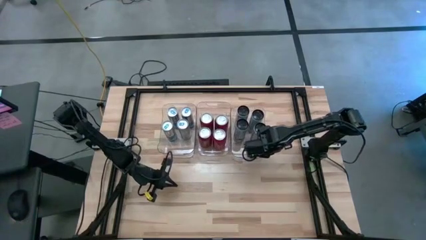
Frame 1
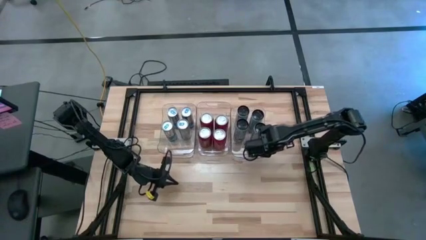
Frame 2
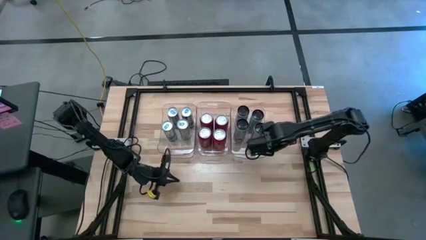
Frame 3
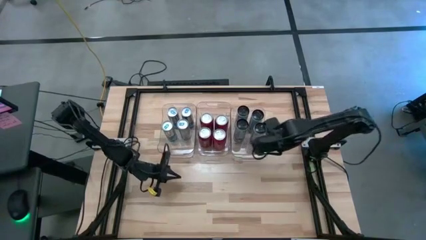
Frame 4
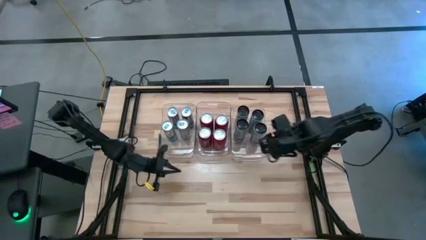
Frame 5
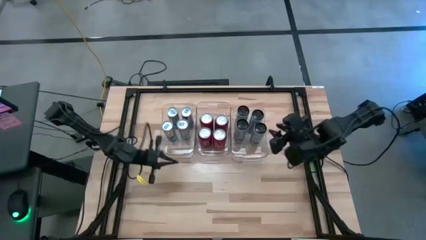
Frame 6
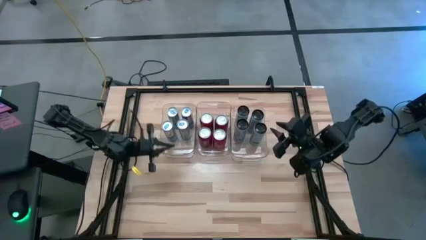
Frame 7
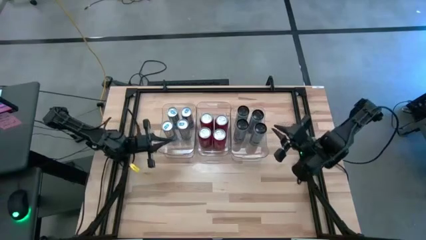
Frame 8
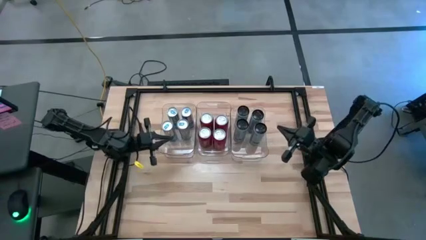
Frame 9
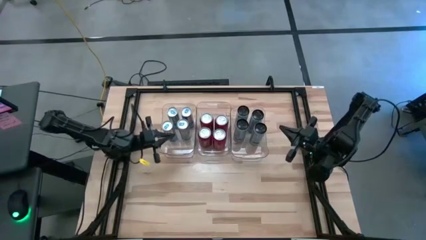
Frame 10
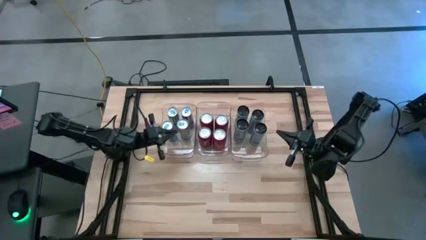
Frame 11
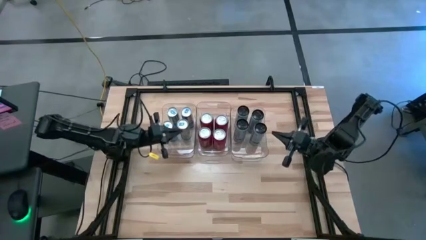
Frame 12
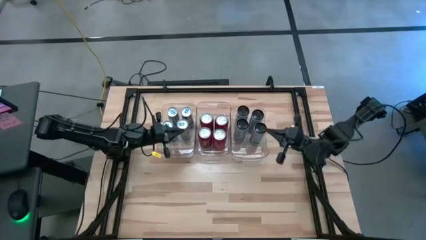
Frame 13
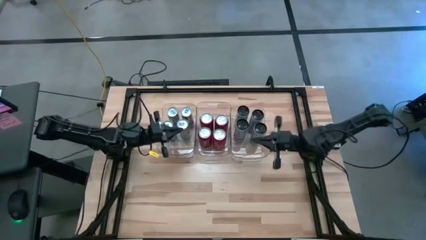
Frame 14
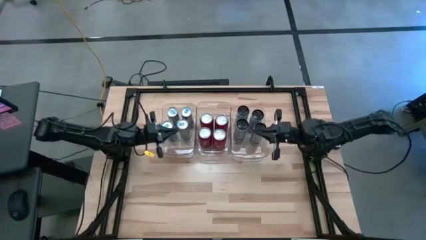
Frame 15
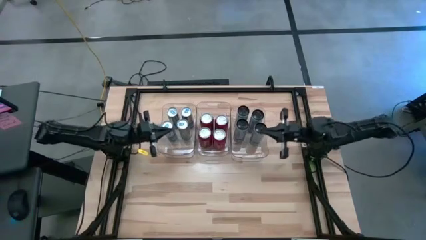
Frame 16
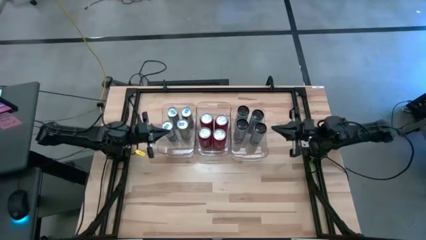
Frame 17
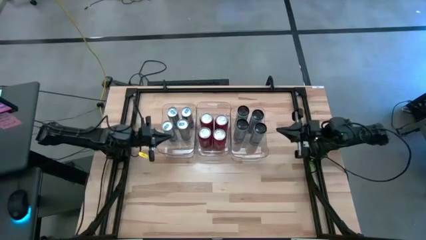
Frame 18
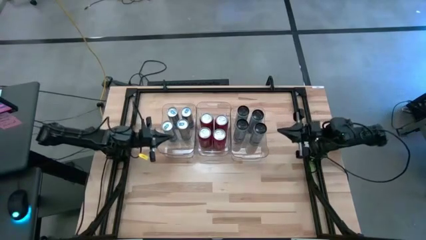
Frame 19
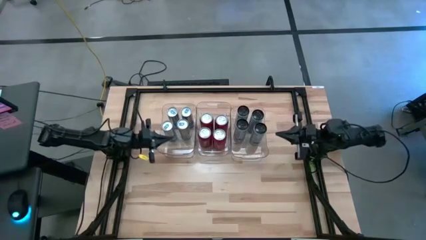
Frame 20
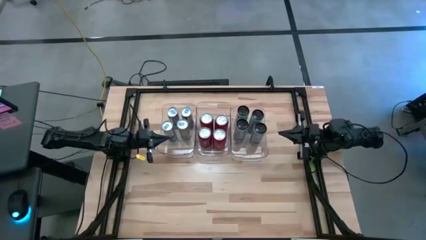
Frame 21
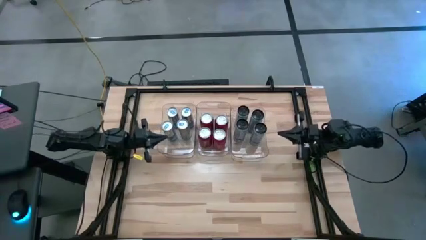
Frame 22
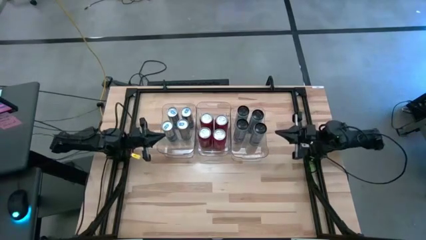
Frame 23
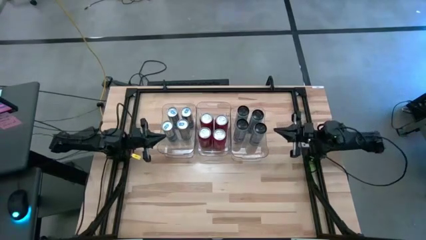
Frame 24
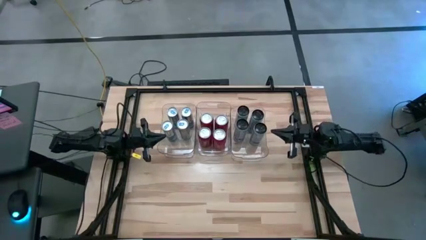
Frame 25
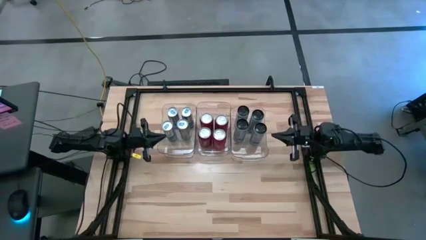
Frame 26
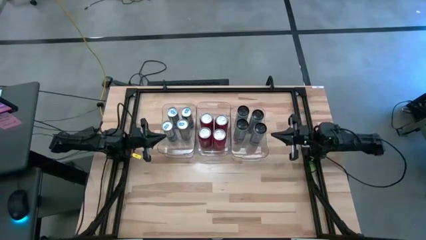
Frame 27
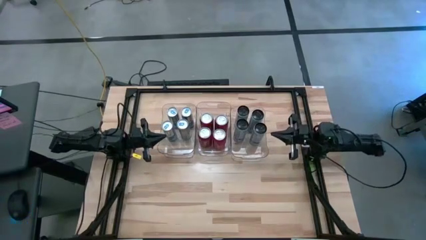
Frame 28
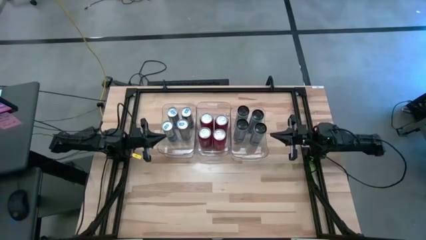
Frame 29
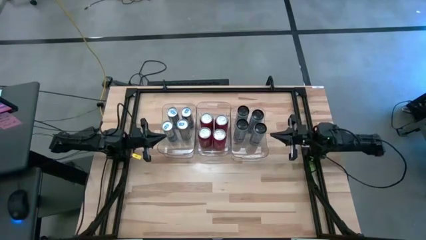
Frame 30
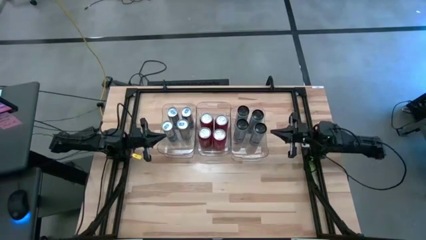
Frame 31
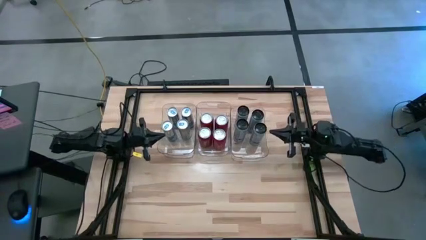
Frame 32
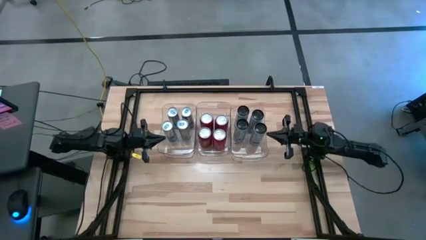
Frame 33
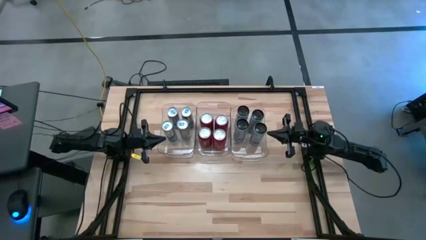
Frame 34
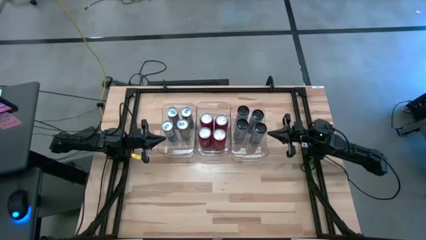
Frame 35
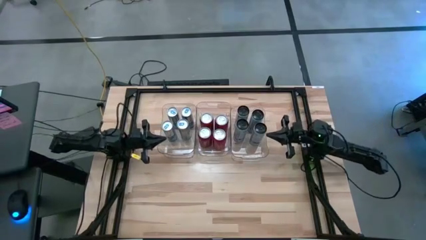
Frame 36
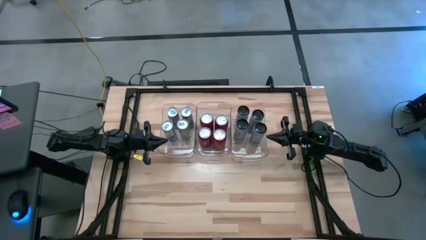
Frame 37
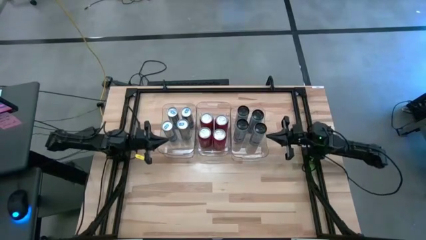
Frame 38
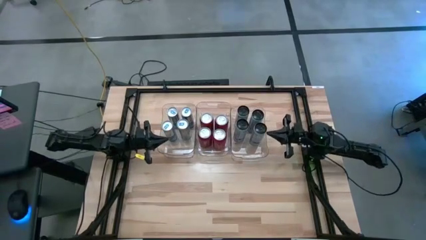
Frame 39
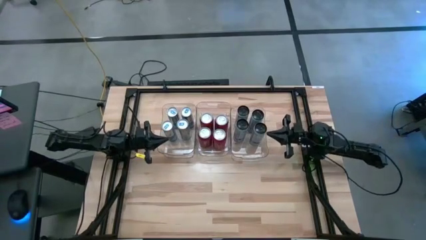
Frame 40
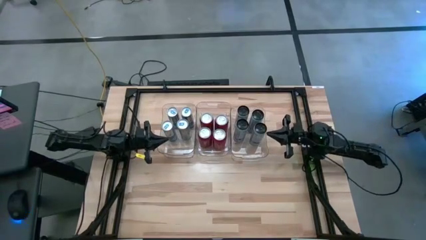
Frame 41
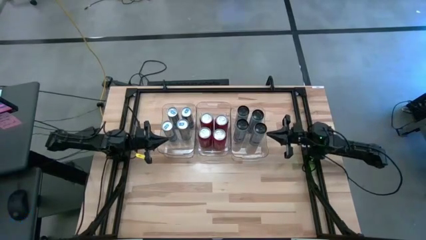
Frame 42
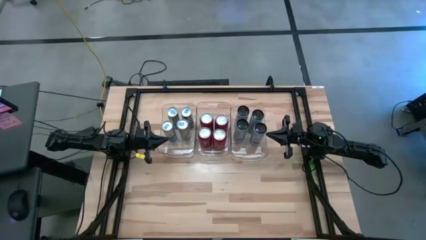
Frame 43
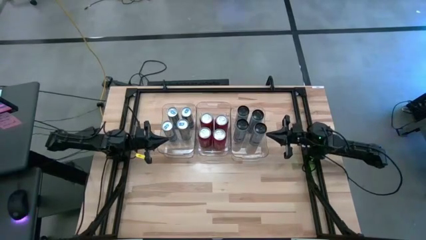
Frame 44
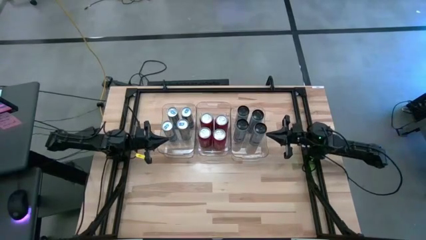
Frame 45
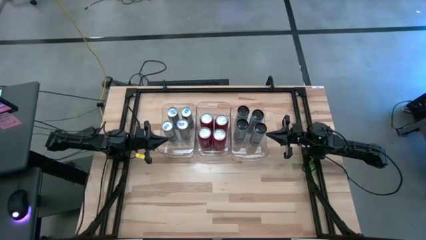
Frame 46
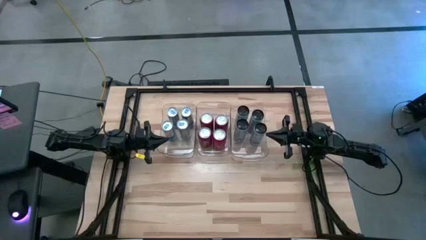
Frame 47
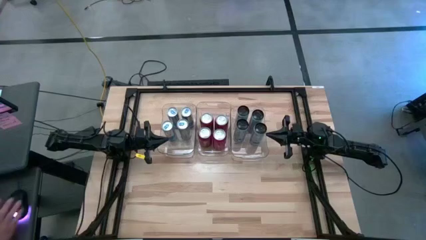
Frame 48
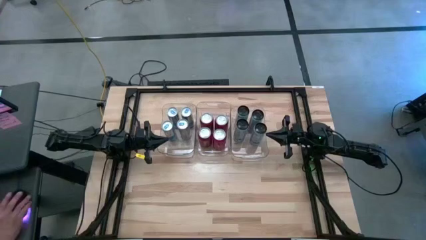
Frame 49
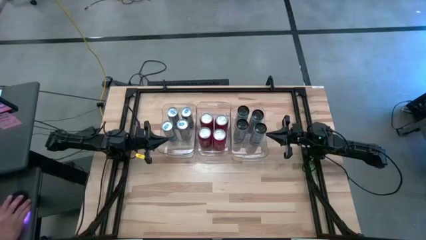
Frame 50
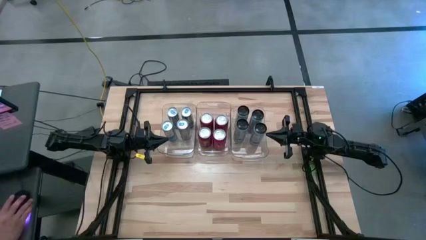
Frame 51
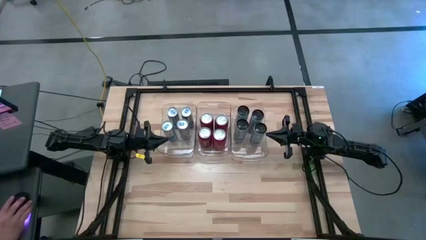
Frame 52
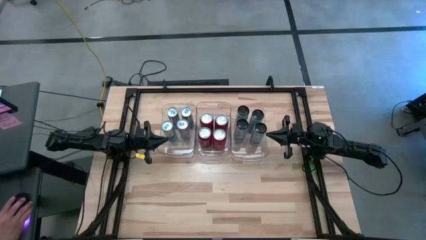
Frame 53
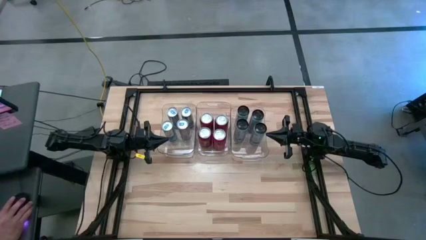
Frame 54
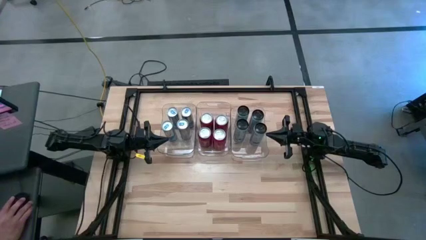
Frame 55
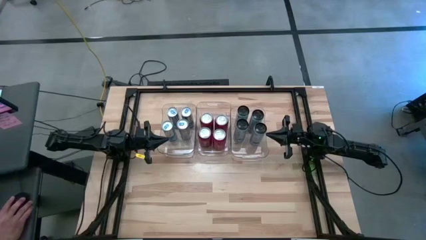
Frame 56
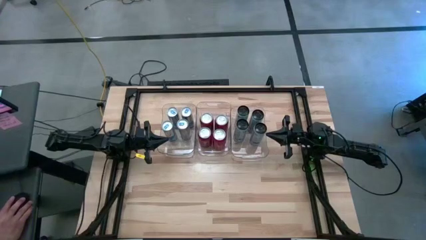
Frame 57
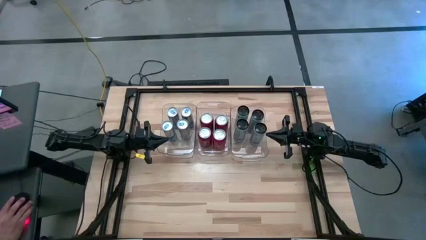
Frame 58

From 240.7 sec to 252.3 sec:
Task: Sort soda cans
Return to Home Position
